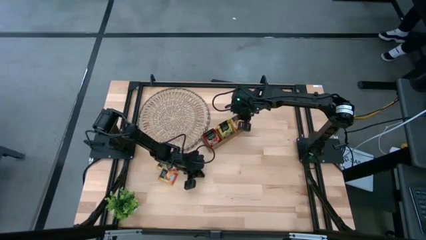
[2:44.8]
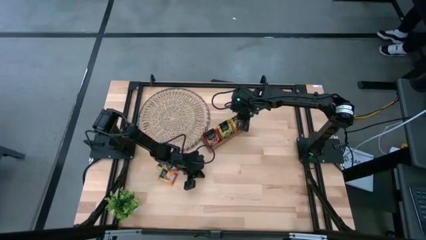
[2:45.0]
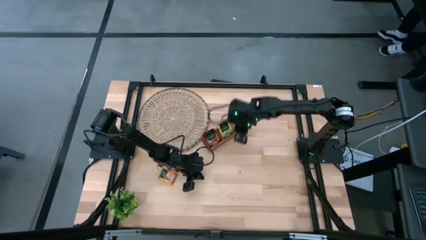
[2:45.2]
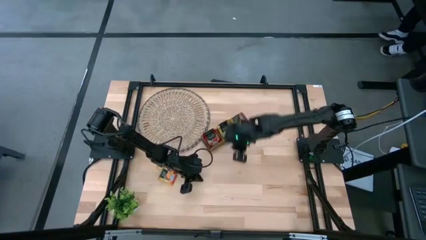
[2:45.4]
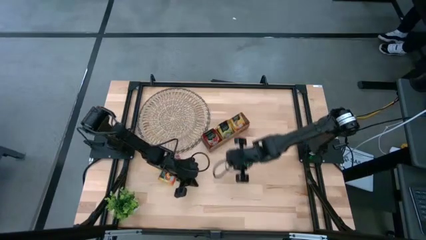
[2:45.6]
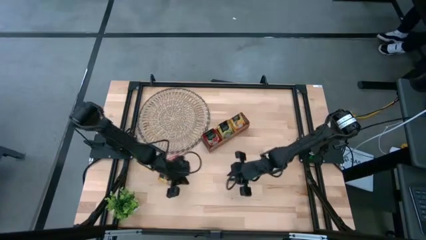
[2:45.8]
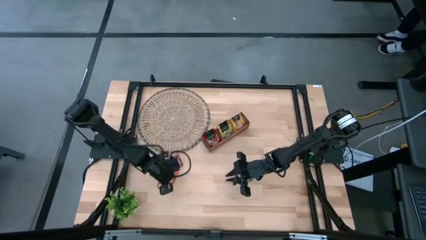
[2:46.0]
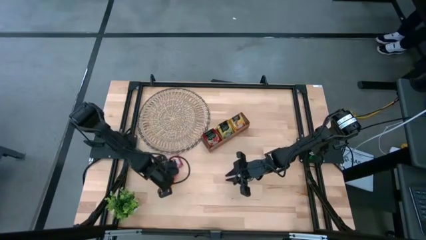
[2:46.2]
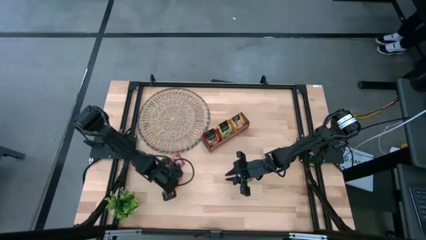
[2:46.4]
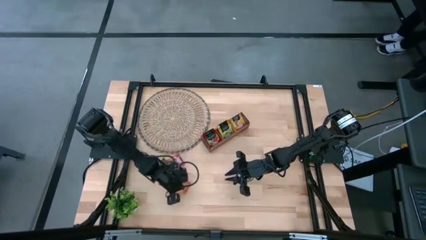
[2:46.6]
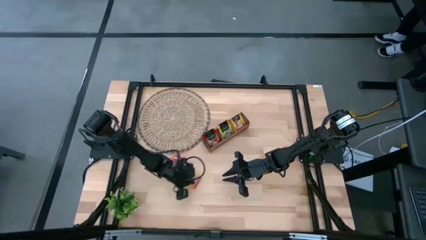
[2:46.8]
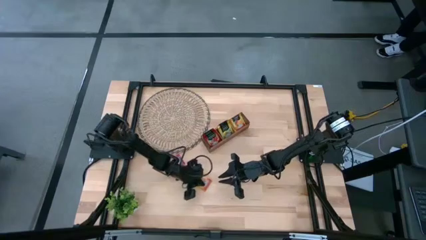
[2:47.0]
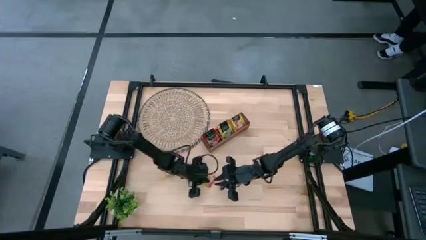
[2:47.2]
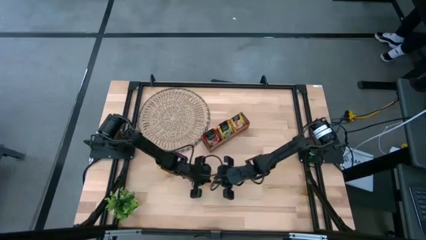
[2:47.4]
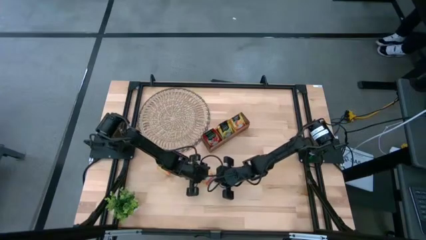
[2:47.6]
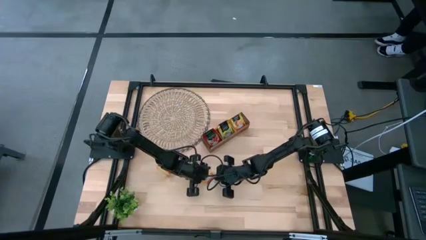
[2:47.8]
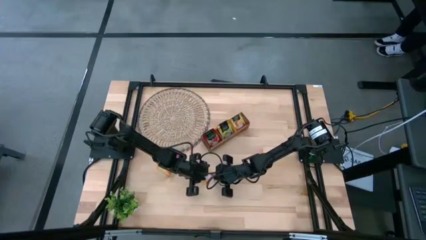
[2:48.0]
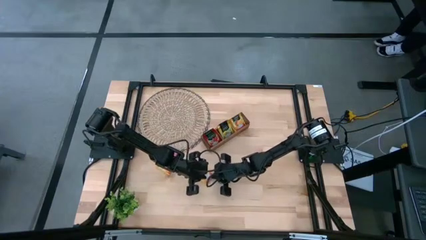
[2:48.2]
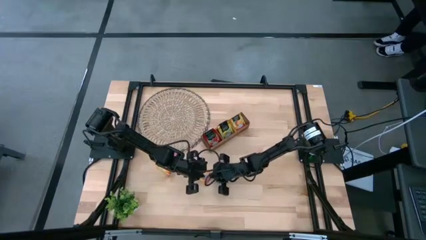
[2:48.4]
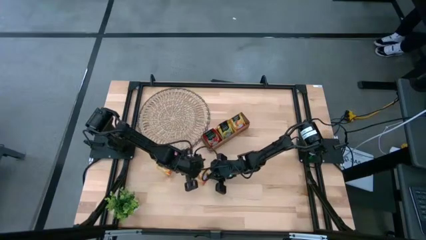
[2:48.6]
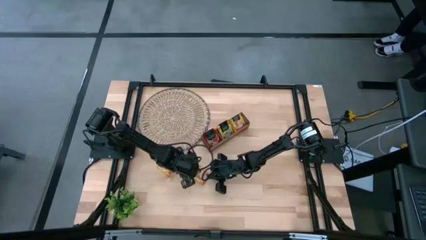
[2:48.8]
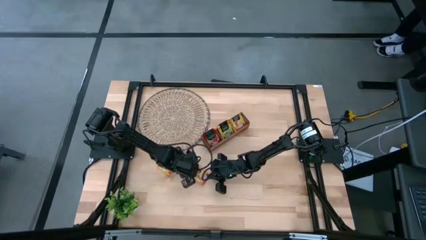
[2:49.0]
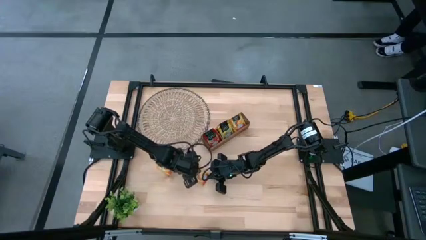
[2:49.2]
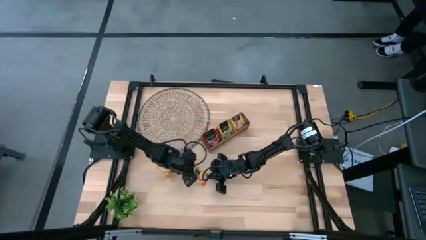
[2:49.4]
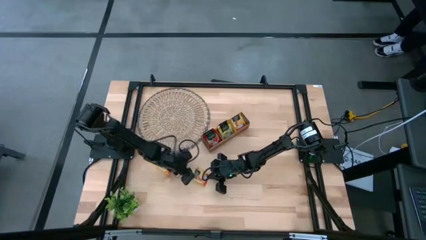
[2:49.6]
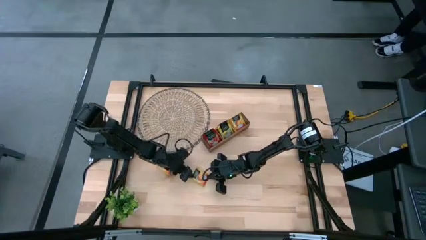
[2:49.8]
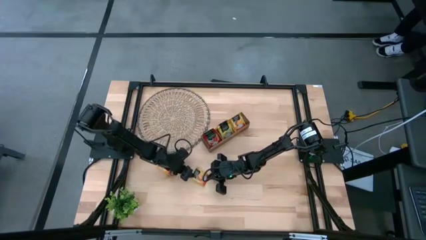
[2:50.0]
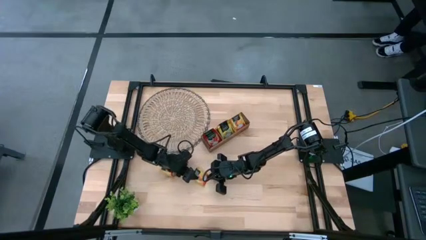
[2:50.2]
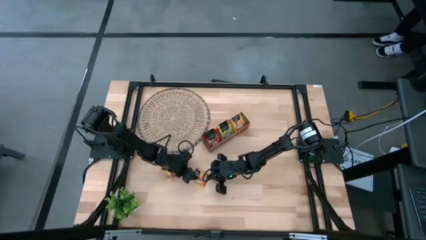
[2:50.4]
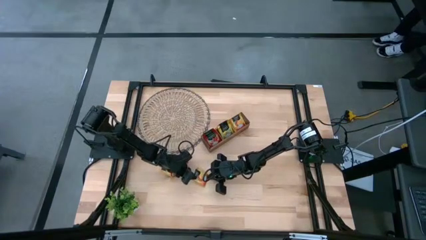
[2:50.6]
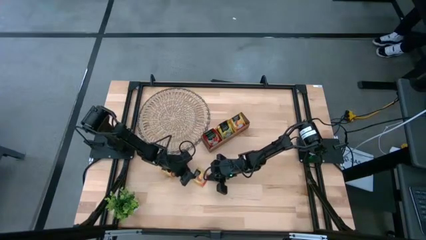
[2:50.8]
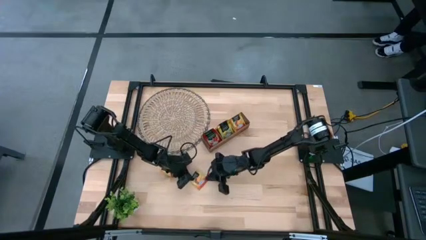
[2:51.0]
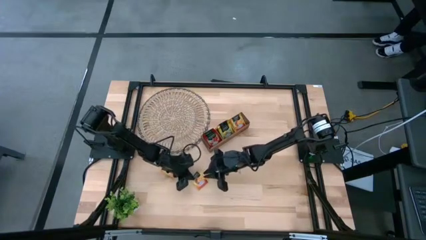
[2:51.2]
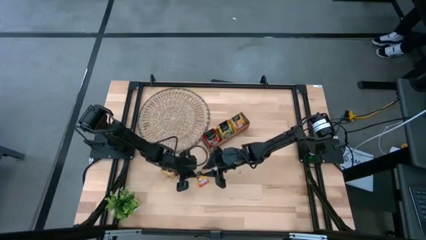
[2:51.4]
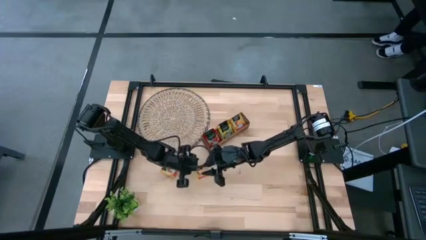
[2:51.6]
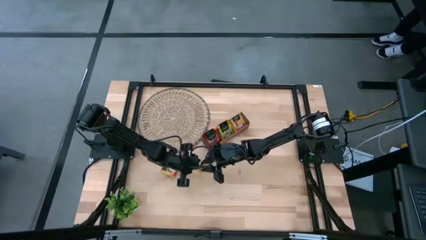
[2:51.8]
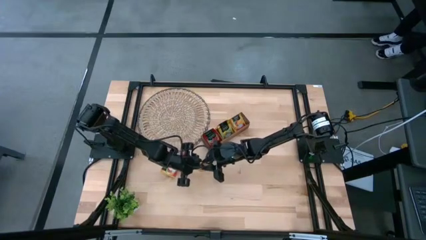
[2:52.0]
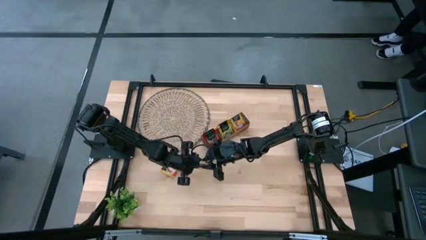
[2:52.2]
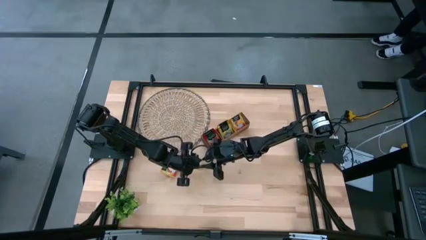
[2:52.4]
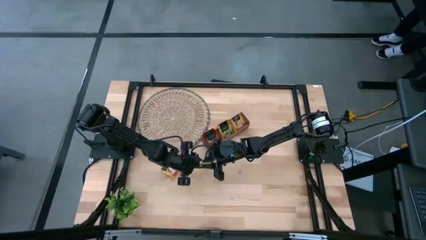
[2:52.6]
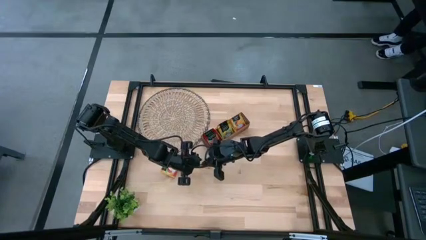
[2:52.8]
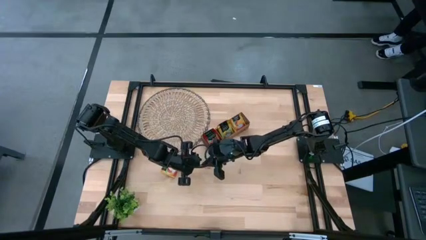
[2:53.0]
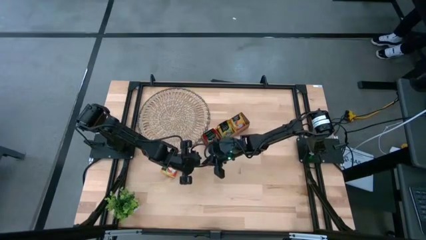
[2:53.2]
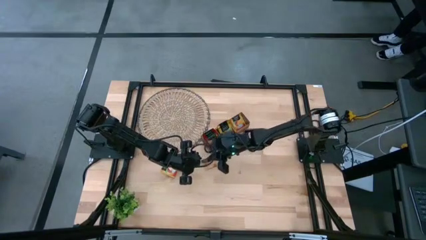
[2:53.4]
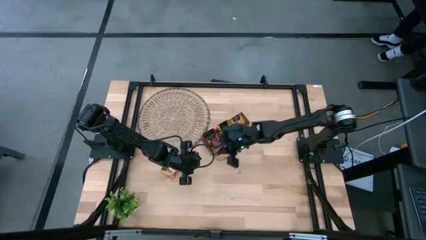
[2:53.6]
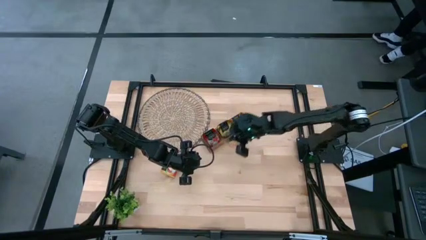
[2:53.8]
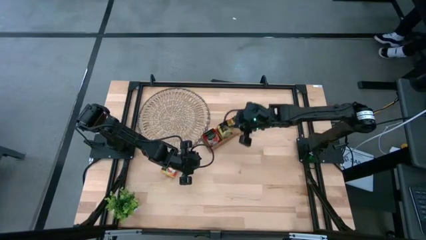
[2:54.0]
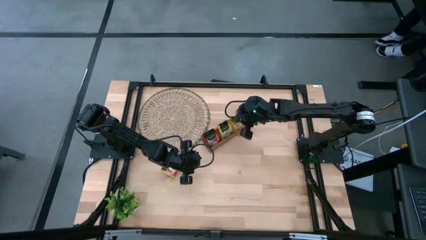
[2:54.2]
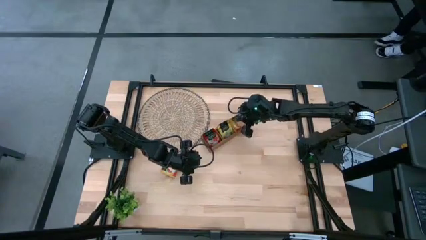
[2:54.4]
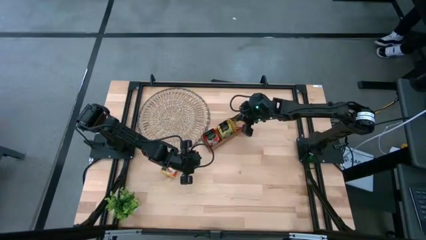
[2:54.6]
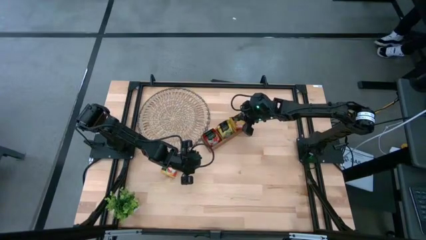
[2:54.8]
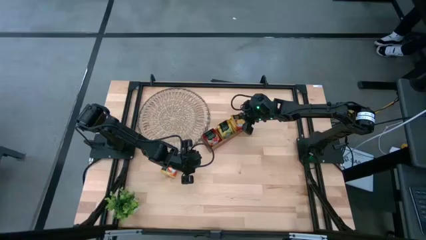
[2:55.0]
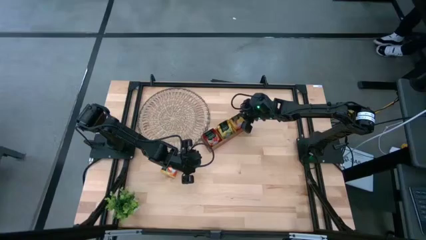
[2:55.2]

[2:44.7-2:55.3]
Task: Pick & Place Tea
Put the orange tea bag into the right section of the wooden organizer

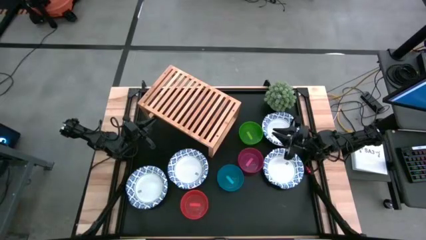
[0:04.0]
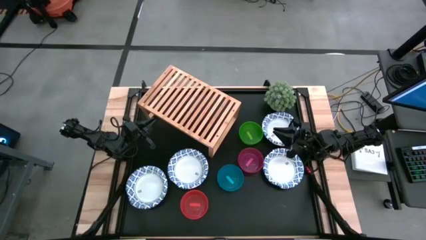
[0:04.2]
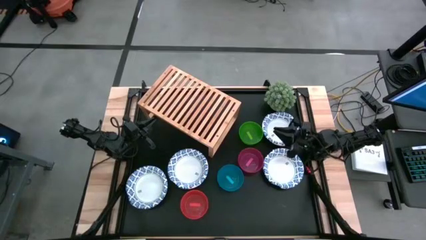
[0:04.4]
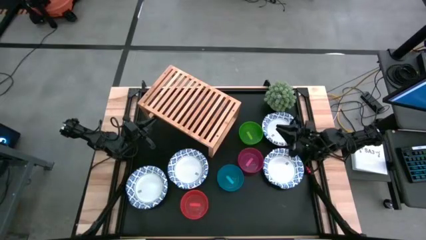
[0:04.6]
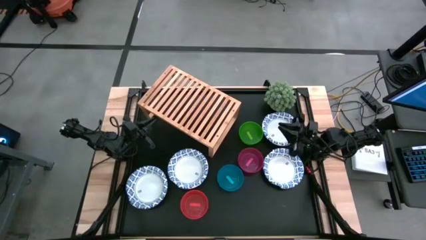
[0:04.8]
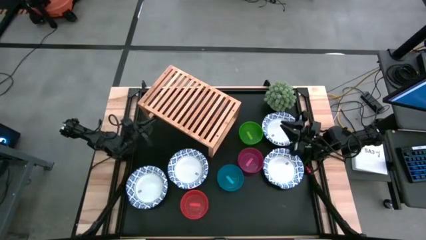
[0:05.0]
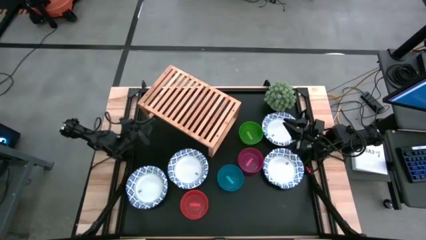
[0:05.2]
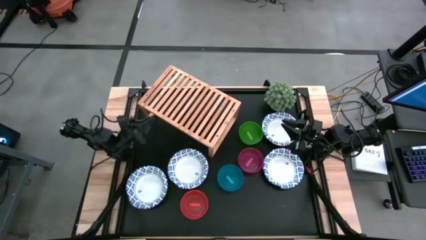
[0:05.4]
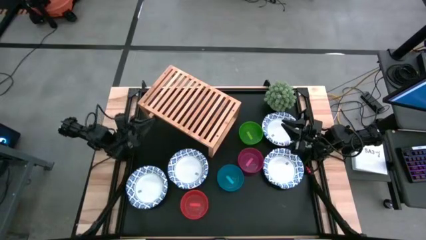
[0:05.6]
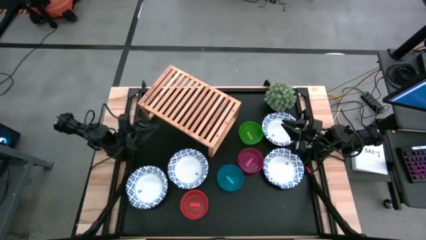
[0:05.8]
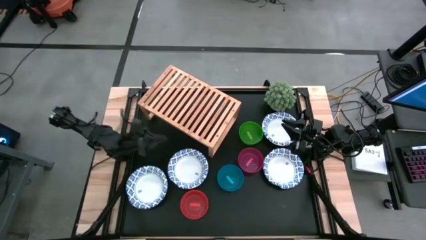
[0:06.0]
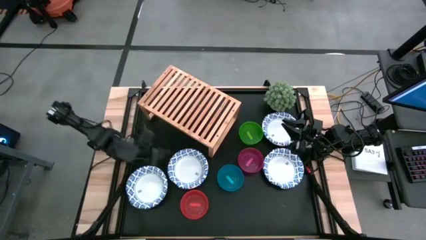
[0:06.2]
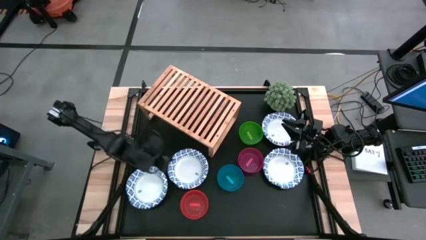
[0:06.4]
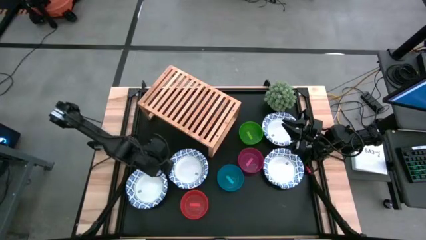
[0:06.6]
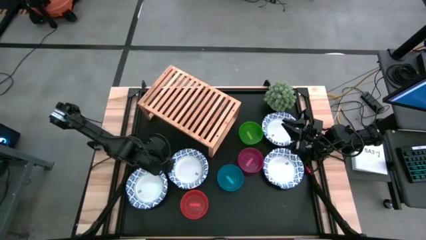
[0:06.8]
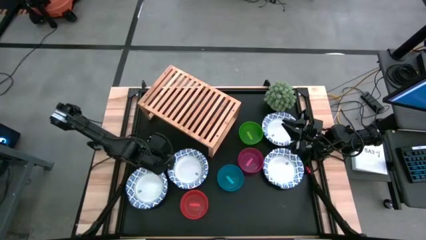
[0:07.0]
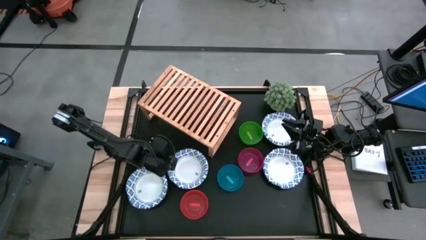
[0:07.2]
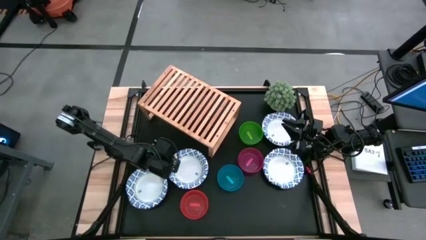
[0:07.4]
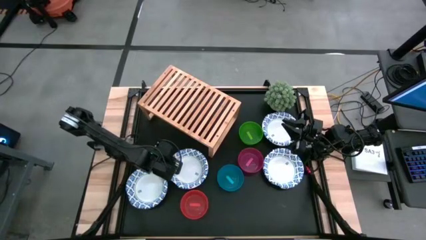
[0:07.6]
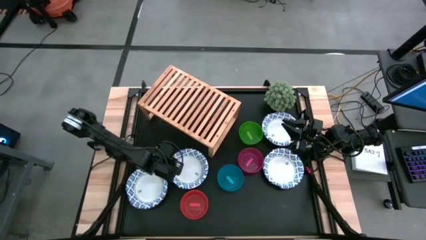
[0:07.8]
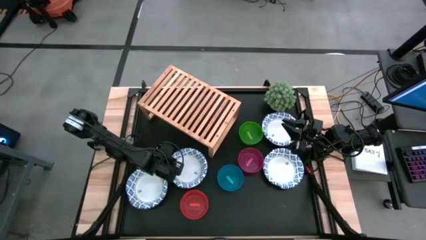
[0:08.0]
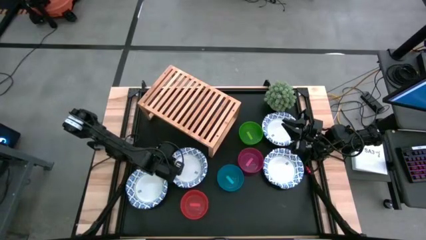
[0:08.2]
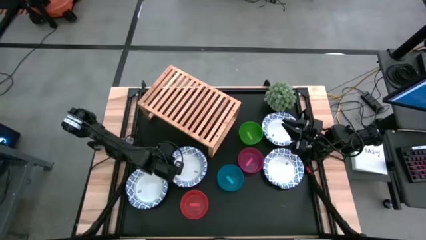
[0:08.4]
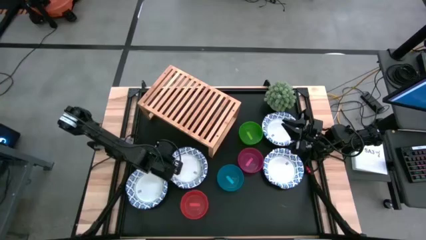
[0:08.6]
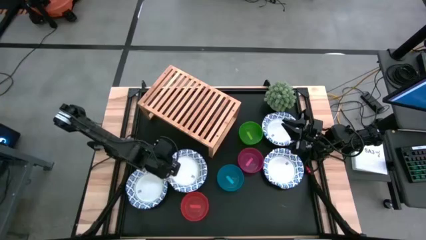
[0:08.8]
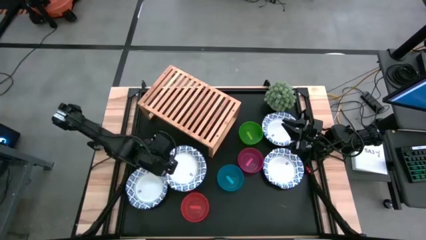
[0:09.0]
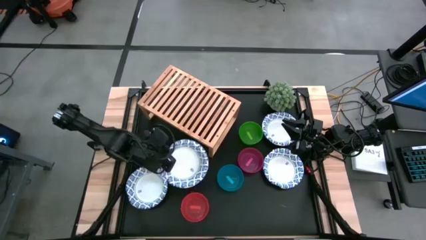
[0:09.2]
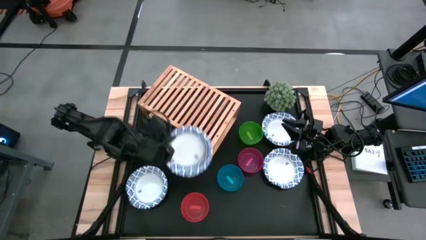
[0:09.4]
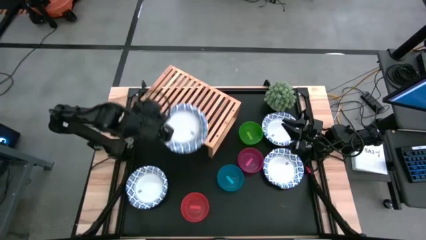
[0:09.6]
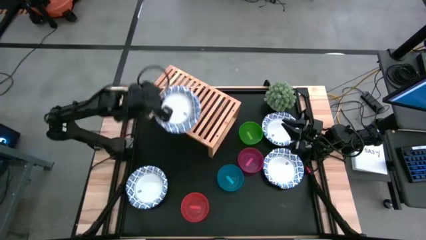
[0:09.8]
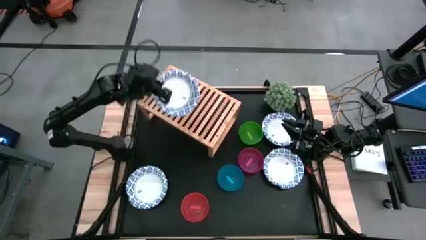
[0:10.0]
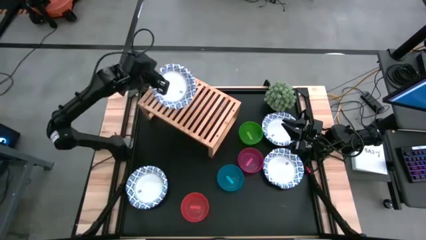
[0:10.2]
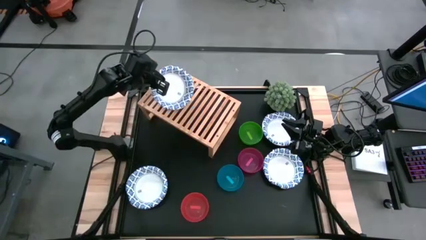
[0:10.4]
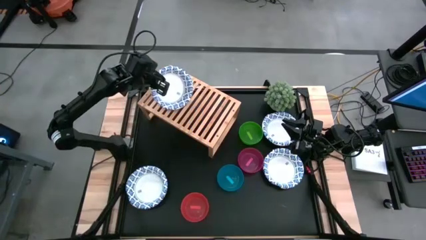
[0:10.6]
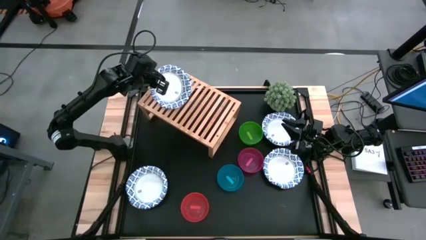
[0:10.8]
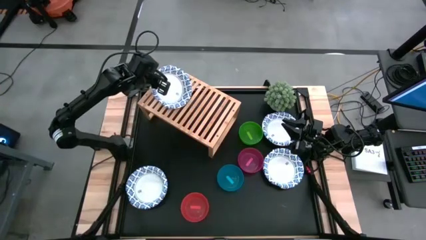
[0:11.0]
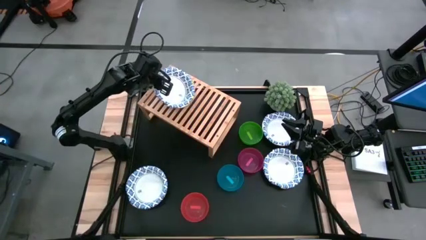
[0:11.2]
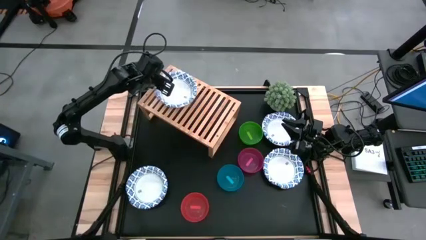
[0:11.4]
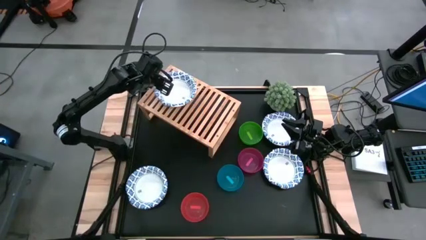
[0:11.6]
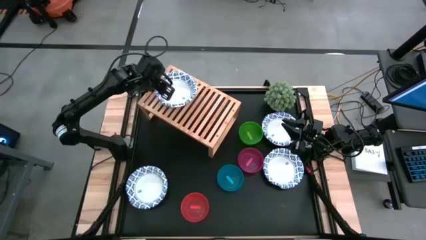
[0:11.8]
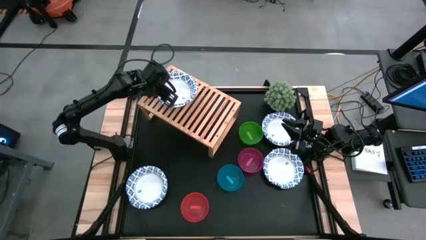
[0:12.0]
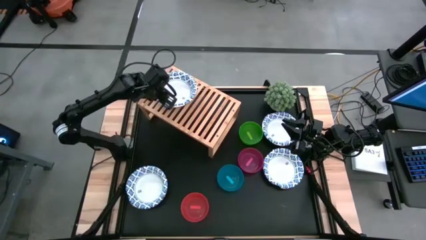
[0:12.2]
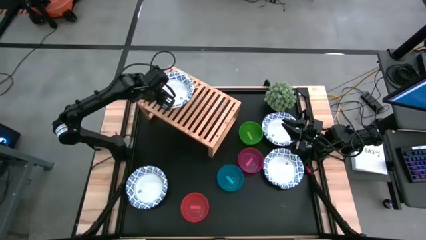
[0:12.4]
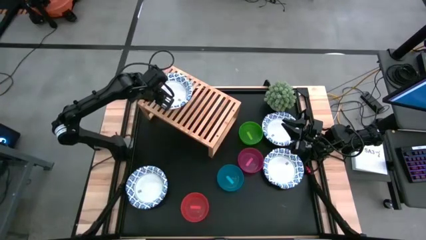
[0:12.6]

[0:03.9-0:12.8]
Task: Place and stack bowls onto a shelf
Put the top left white patterned bowl on the shelf
